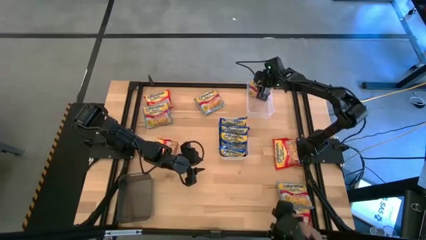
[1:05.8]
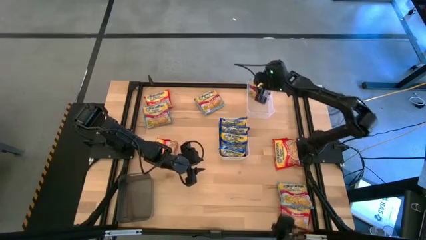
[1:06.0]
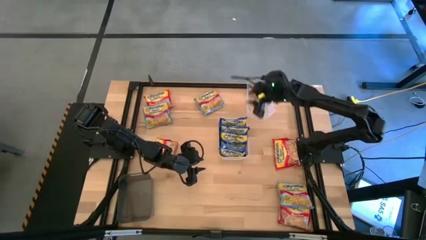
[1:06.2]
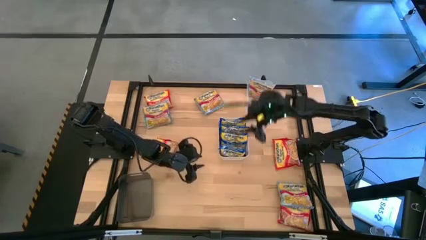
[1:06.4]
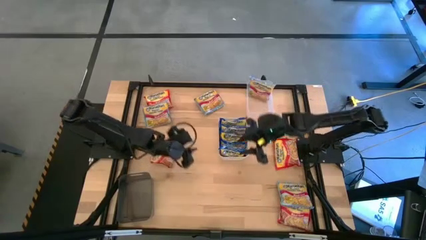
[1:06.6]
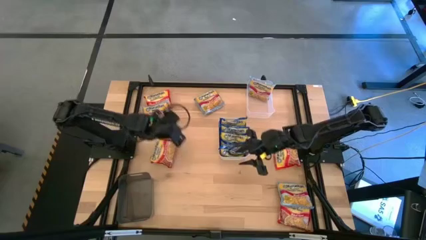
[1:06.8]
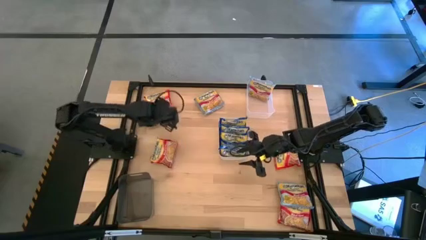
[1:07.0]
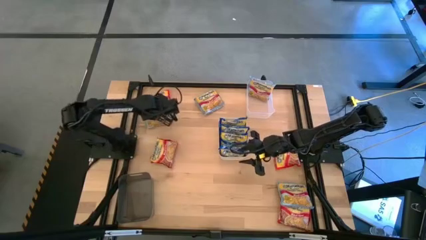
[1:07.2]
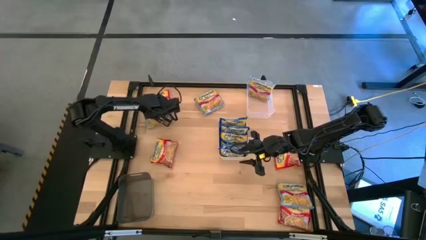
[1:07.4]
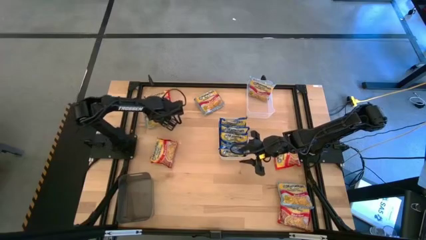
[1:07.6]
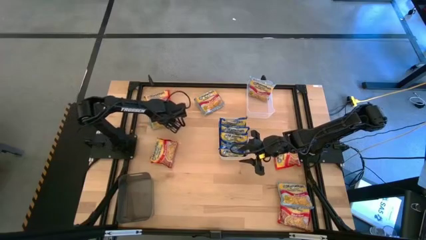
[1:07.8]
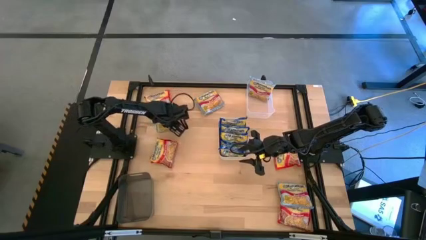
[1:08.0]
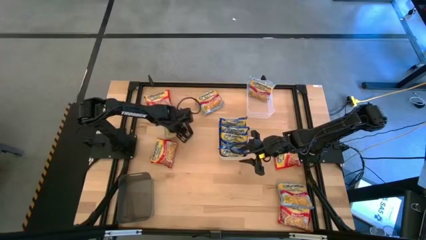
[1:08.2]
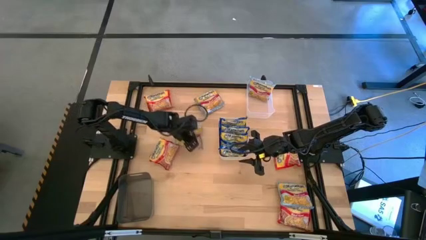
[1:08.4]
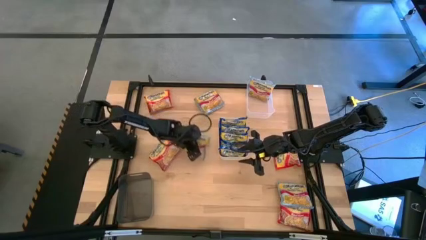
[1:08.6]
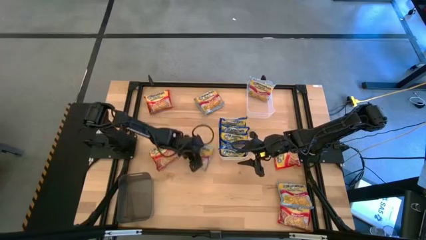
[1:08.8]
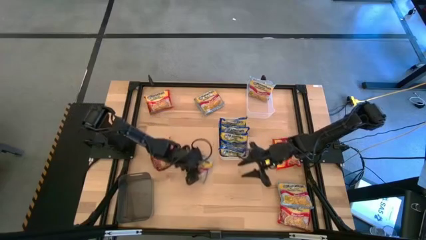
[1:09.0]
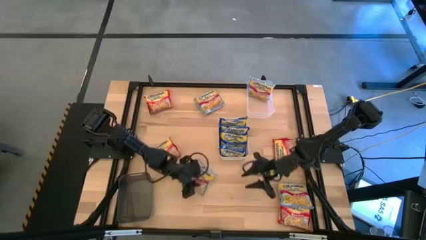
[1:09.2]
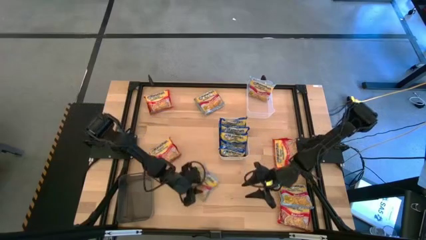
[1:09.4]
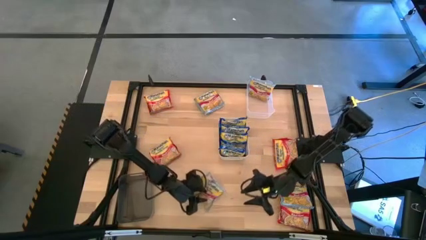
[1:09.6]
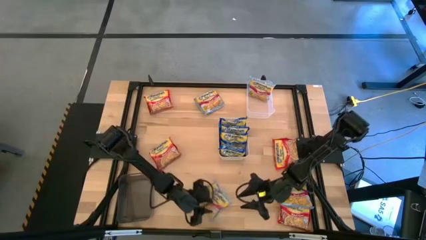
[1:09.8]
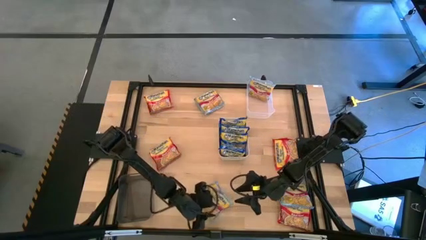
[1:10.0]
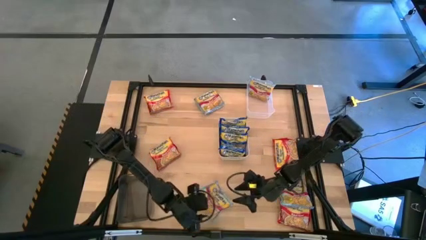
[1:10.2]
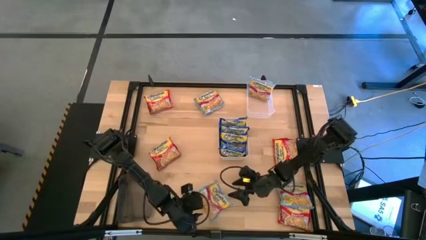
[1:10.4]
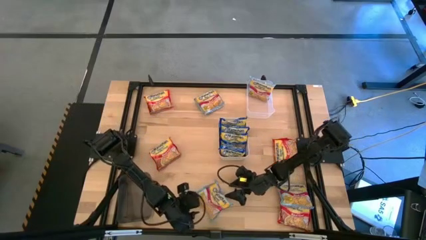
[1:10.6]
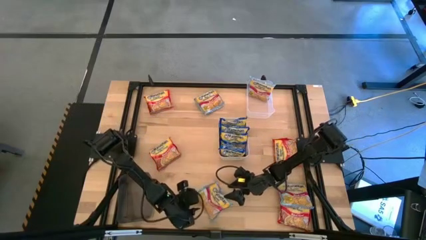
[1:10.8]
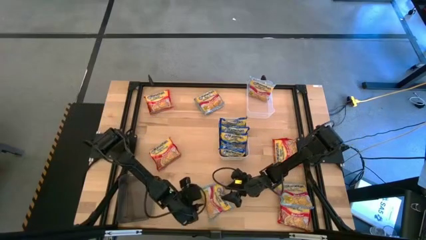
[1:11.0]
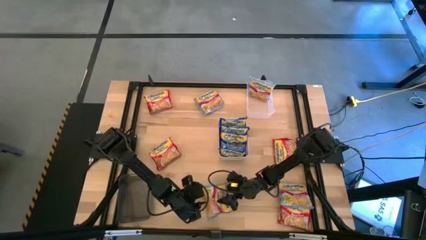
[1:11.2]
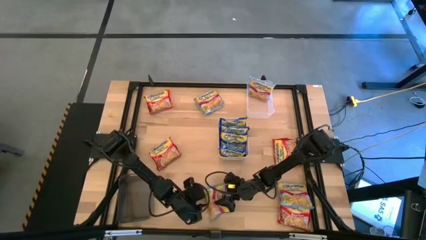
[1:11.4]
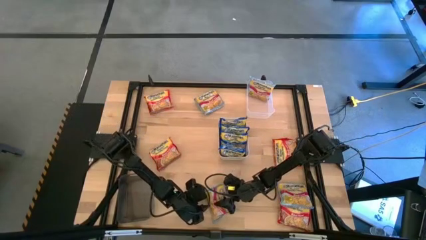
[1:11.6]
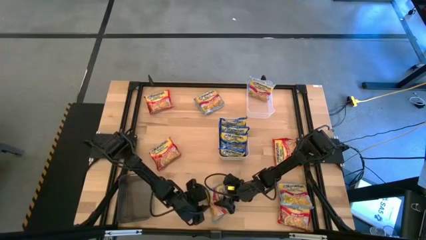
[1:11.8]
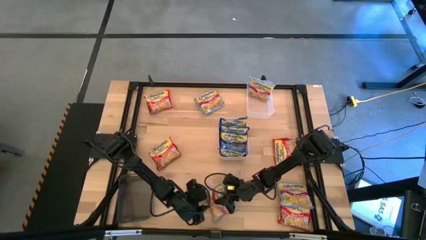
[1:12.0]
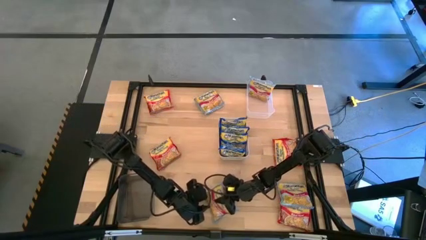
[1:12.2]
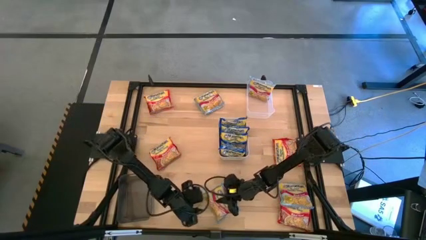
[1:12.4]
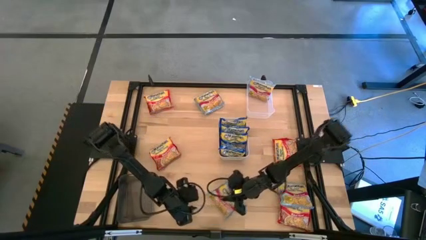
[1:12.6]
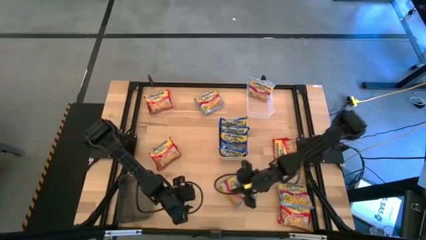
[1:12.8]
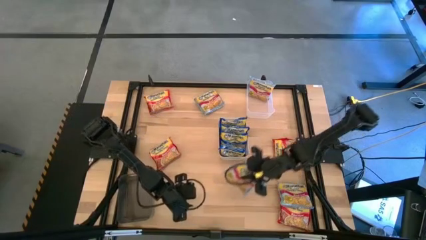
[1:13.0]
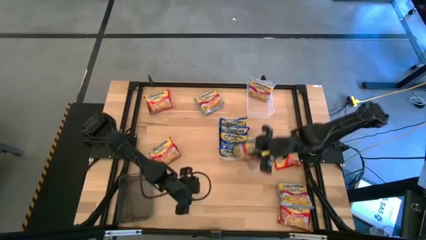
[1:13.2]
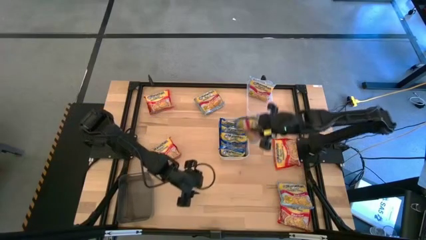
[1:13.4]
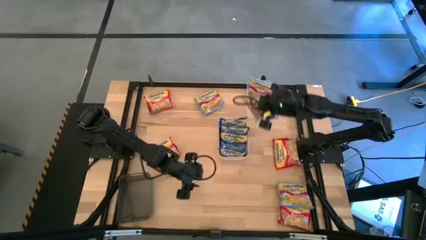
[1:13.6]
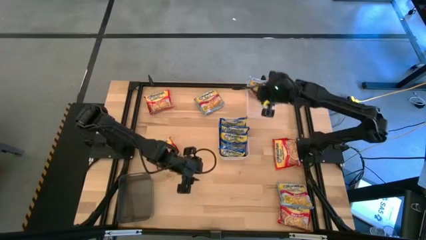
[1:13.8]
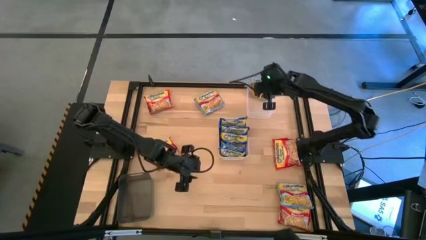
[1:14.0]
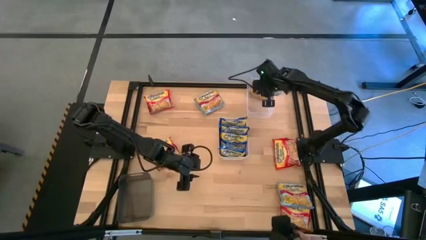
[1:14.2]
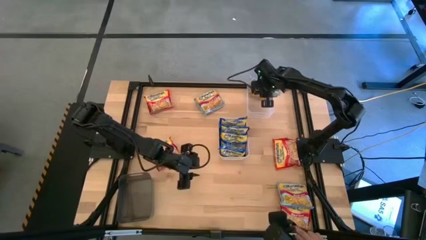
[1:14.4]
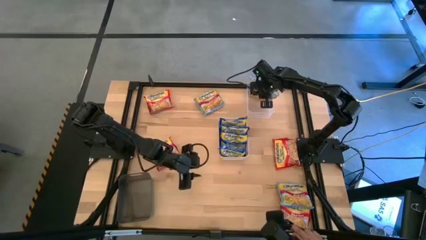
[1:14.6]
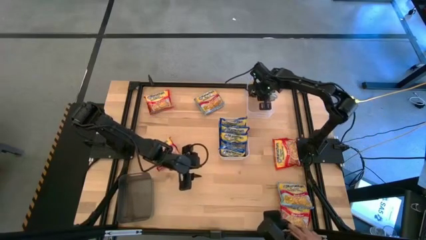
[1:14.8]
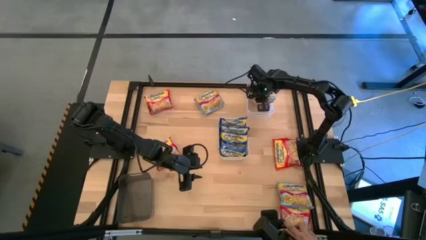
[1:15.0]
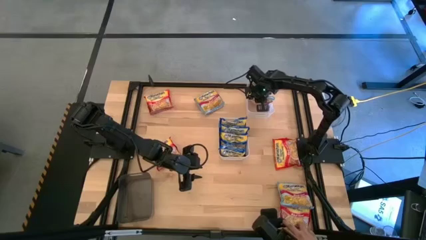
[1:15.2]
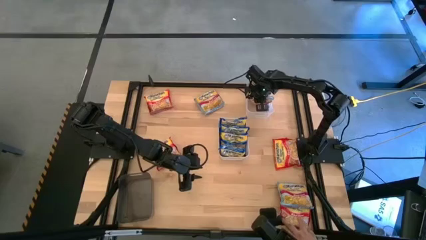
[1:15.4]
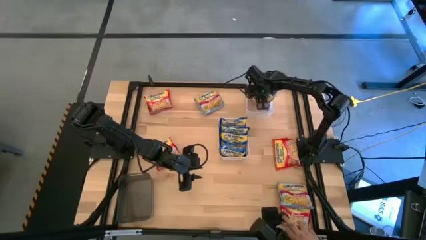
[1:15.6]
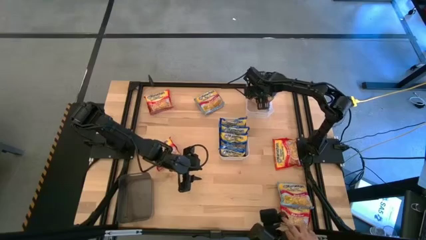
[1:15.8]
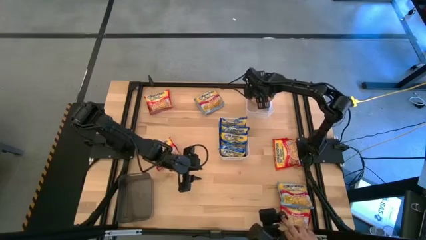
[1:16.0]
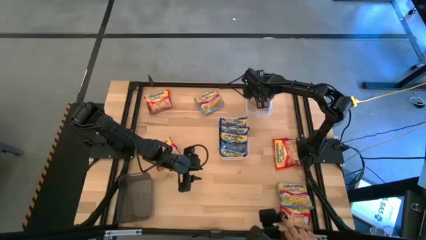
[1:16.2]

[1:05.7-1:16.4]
Task: Sort Maruchan noodles
Put the light blue noodle pack in the transparent bin

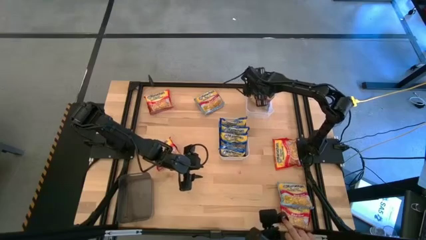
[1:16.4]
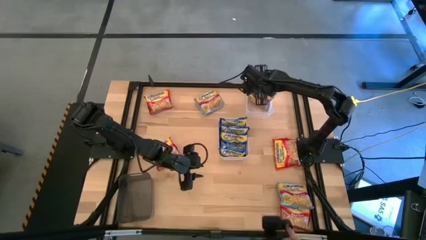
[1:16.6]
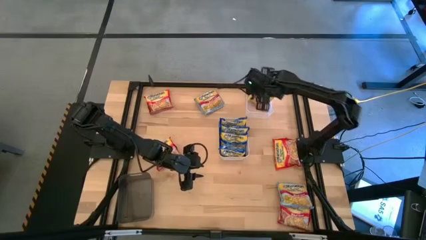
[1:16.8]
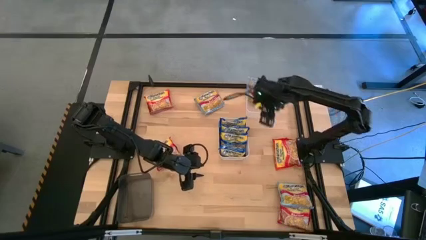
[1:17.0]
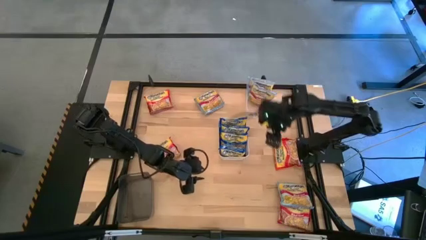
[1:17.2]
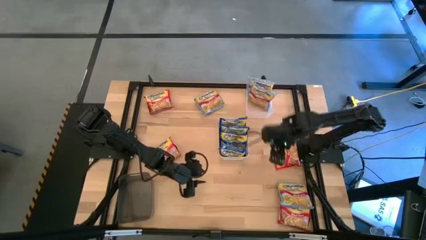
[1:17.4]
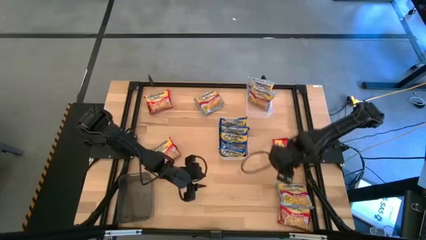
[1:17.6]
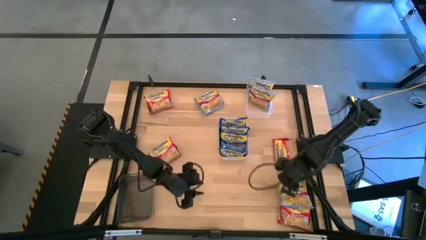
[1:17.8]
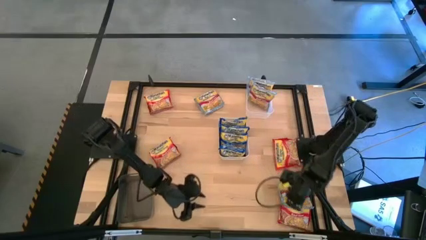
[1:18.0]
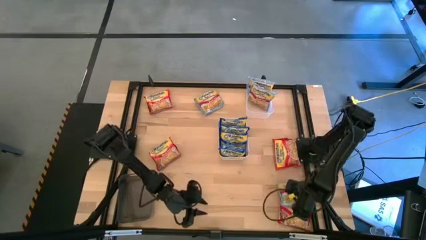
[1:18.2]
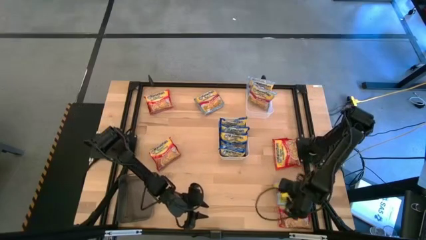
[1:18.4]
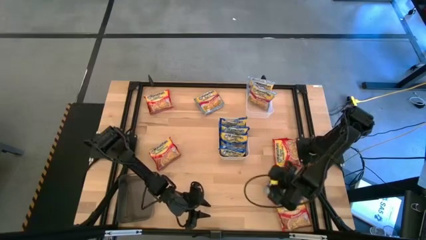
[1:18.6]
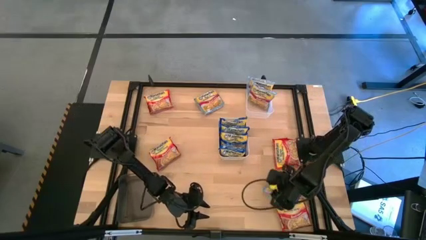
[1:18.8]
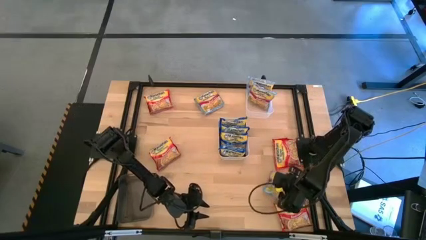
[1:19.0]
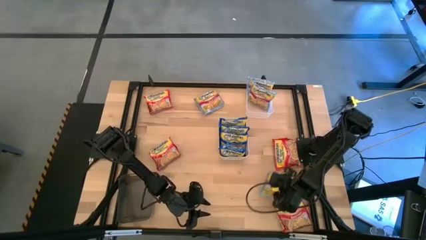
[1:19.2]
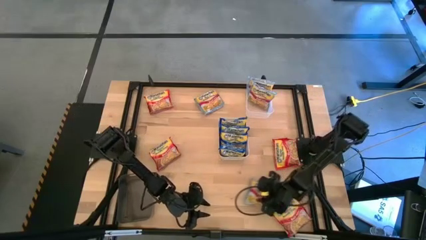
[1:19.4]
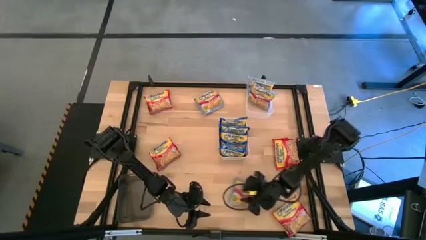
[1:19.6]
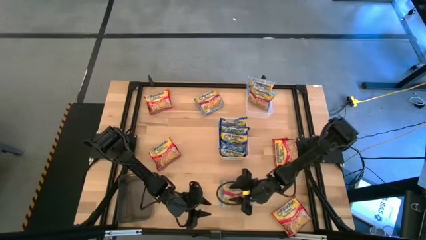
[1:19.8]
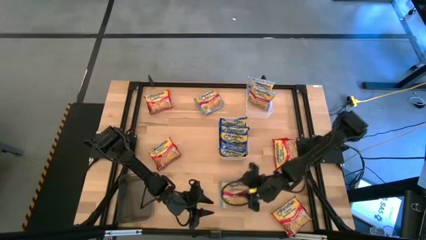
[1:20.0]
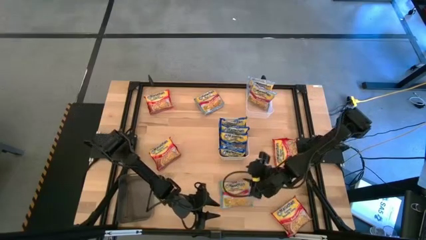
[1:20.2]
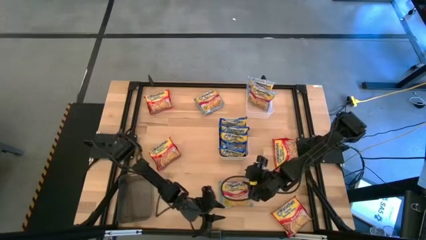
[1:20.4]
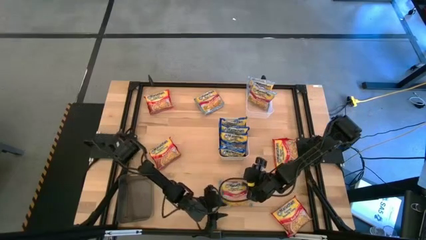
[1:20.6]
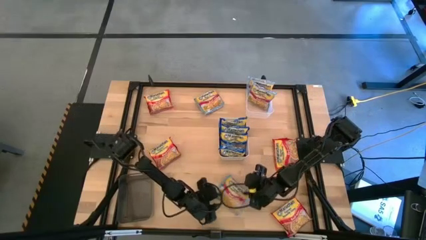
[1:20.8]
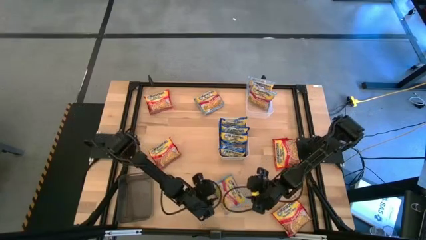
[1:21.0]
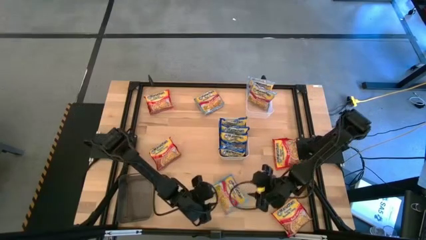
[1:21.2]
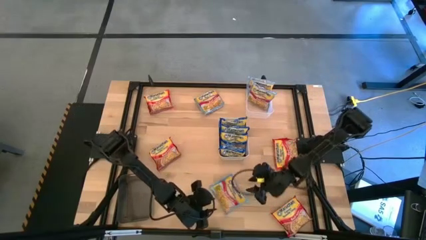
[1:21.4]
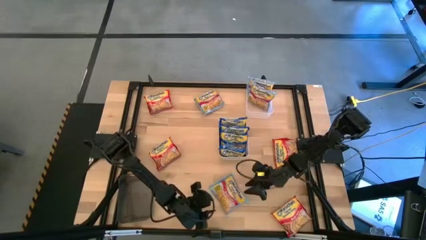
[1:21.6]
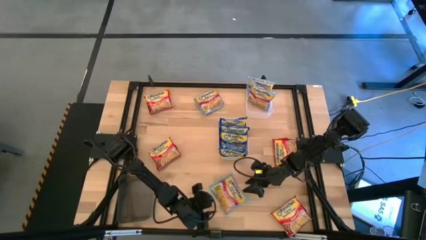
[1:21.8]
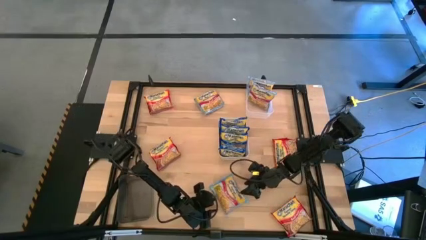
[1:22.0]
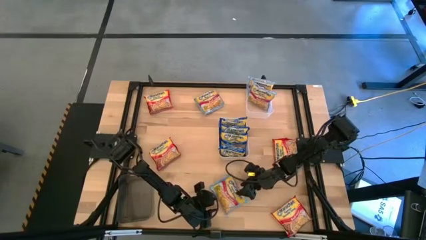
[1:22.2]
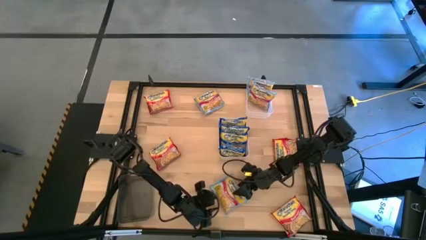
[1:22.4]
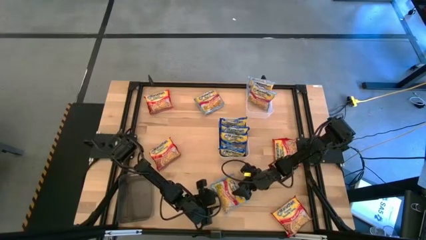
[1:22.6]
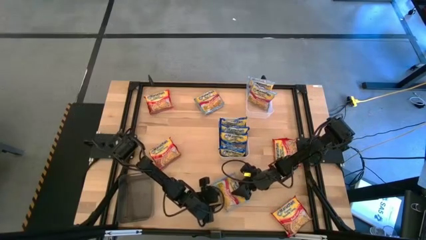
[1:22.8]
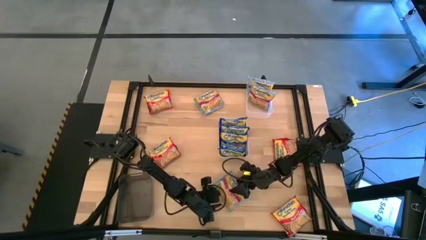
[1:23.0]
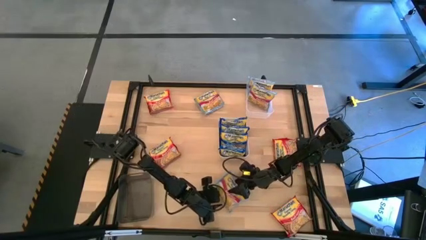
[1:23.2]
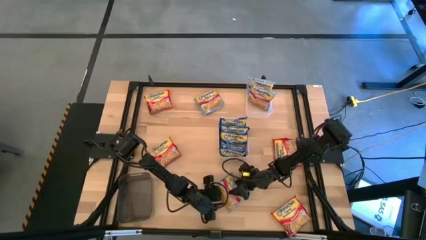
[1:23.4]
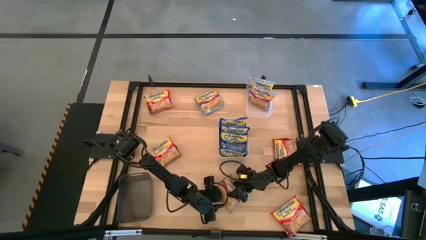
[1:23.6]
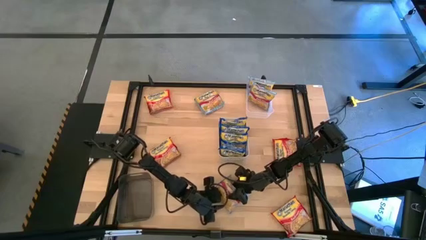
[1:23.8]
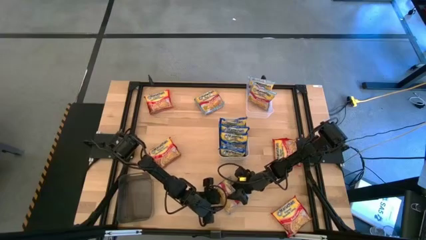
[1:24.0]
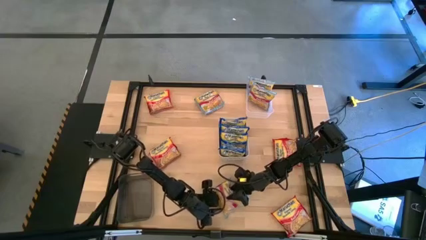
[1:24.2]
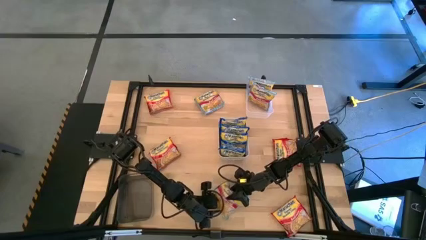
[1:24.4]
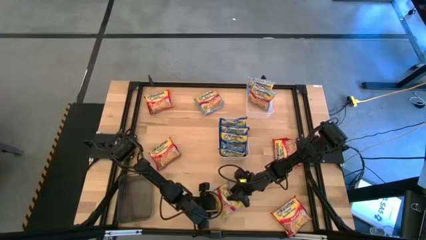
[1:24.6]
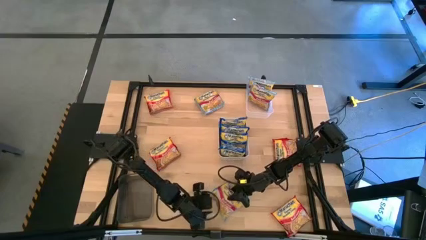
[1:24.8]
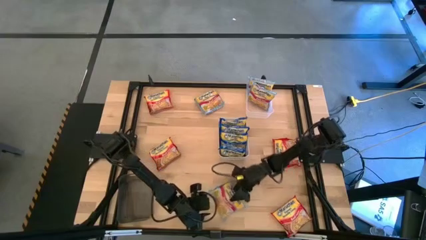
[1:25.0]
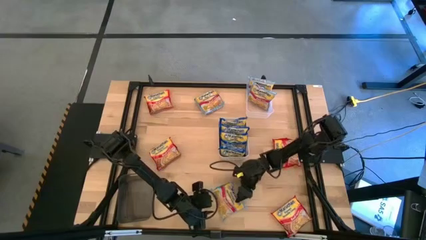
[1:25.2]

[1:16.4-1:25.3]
Put the light blue noodle pack in the transparent bin
